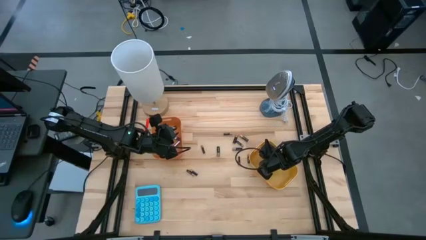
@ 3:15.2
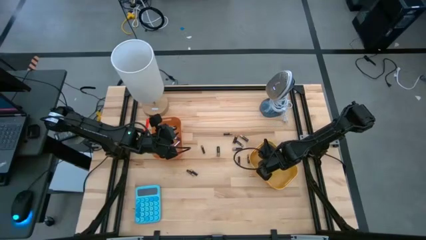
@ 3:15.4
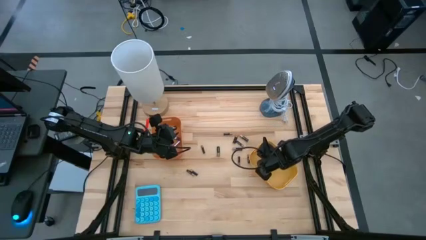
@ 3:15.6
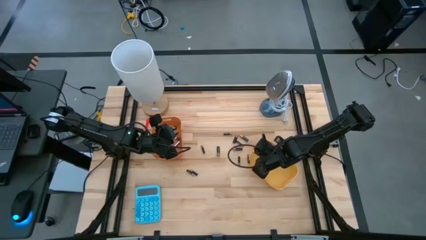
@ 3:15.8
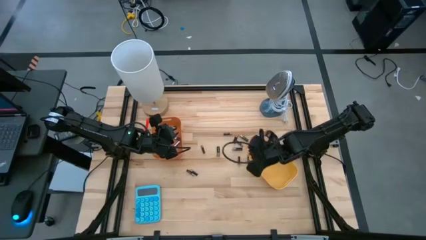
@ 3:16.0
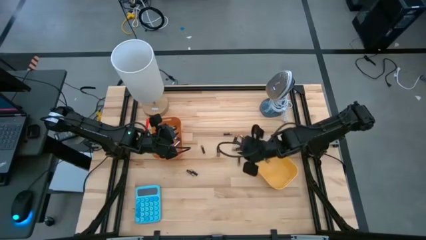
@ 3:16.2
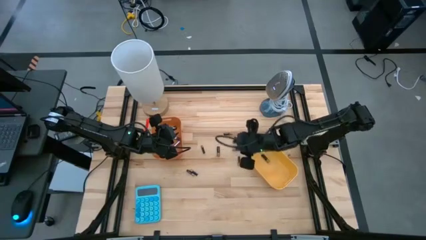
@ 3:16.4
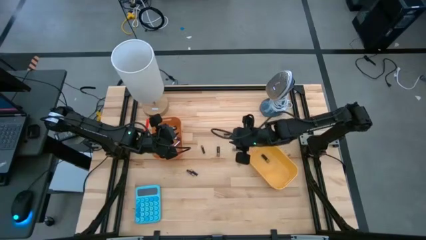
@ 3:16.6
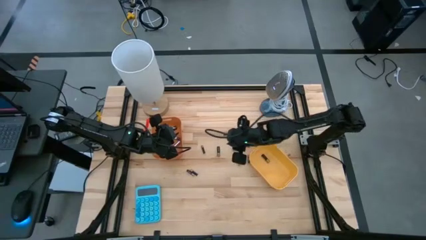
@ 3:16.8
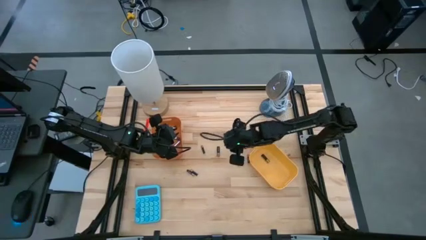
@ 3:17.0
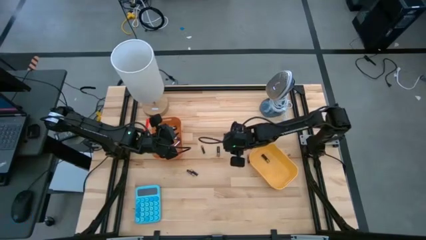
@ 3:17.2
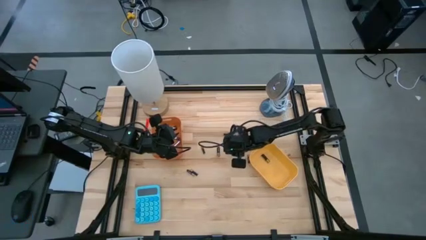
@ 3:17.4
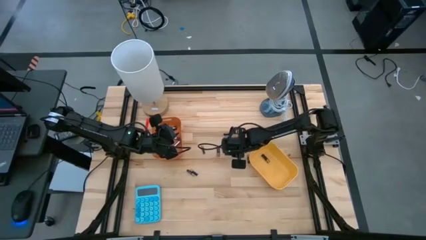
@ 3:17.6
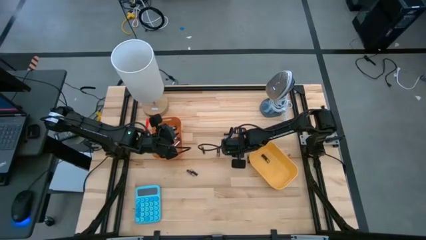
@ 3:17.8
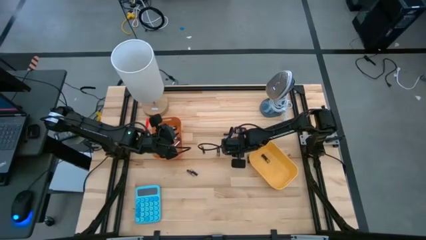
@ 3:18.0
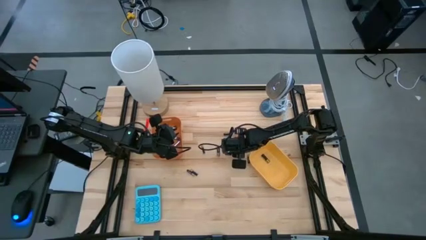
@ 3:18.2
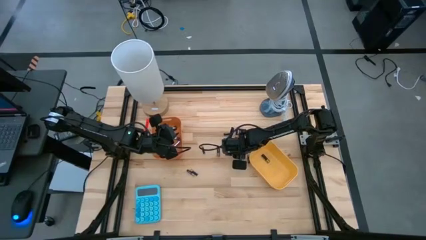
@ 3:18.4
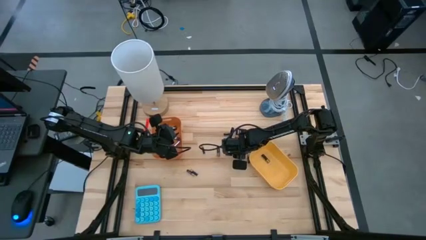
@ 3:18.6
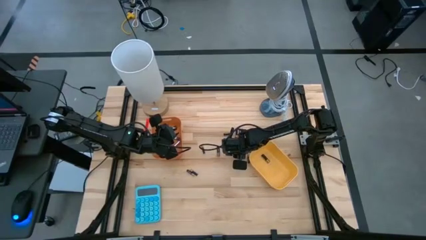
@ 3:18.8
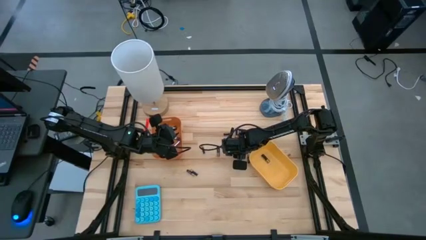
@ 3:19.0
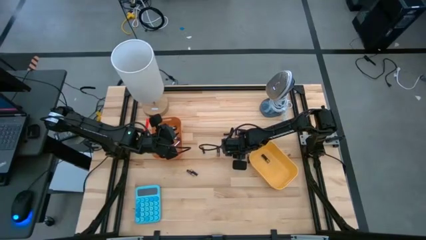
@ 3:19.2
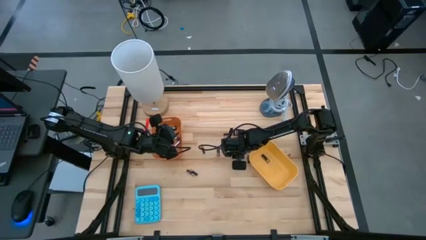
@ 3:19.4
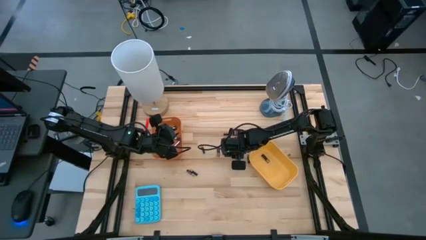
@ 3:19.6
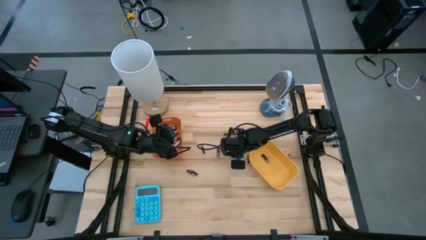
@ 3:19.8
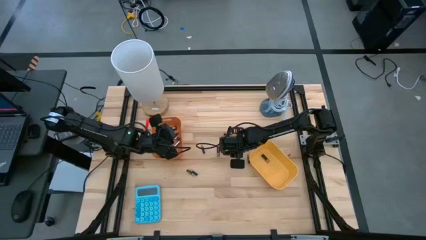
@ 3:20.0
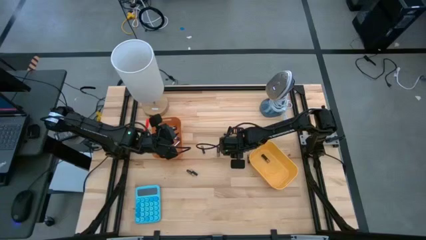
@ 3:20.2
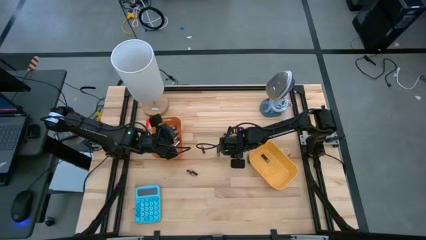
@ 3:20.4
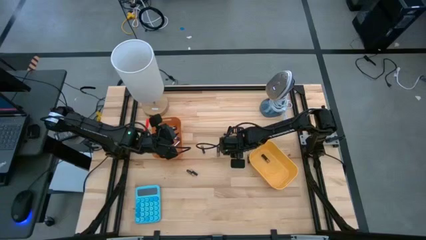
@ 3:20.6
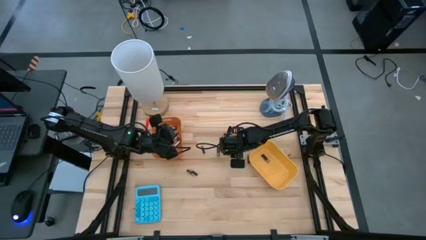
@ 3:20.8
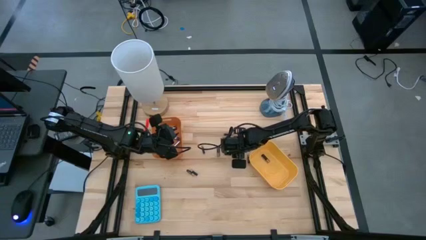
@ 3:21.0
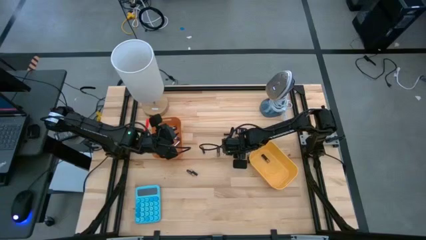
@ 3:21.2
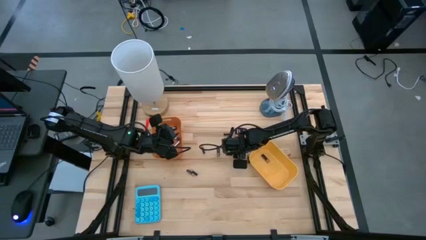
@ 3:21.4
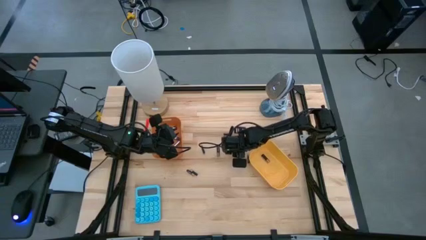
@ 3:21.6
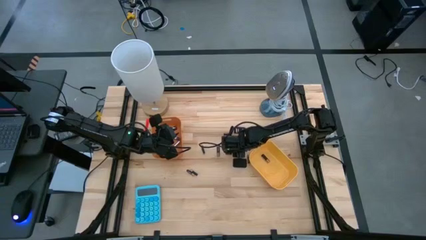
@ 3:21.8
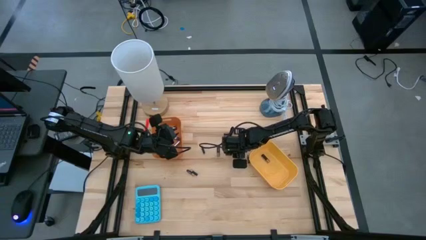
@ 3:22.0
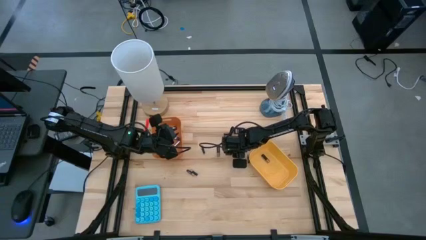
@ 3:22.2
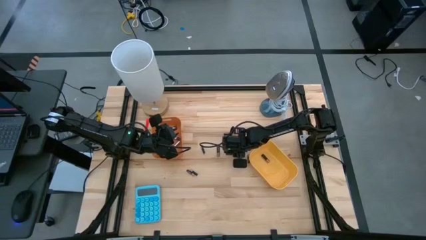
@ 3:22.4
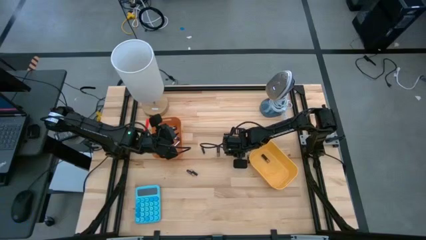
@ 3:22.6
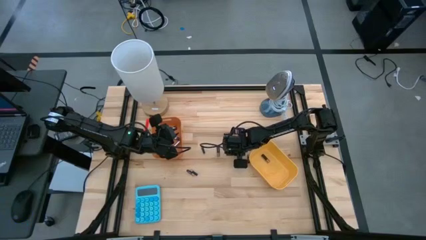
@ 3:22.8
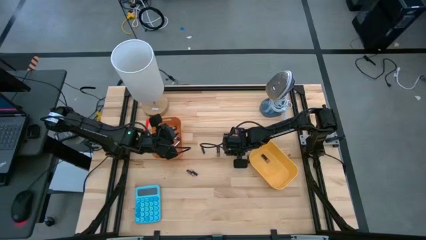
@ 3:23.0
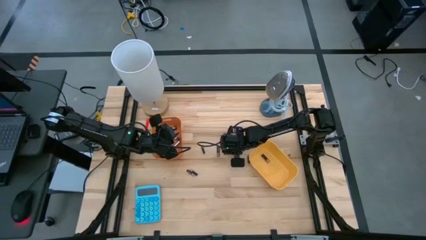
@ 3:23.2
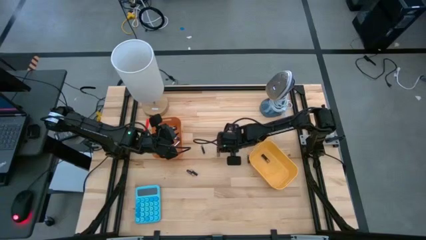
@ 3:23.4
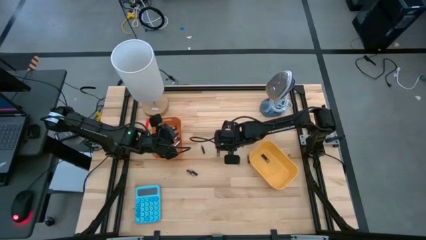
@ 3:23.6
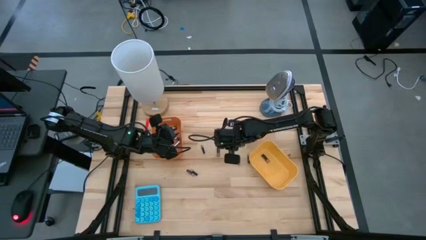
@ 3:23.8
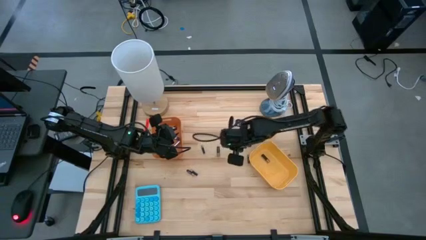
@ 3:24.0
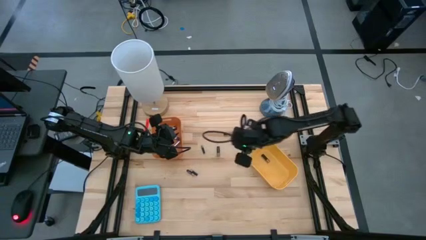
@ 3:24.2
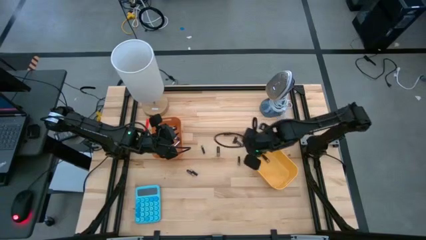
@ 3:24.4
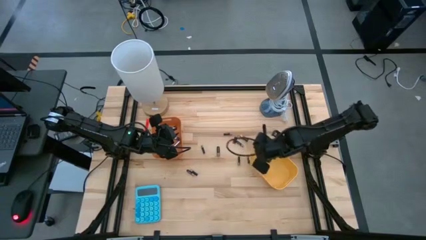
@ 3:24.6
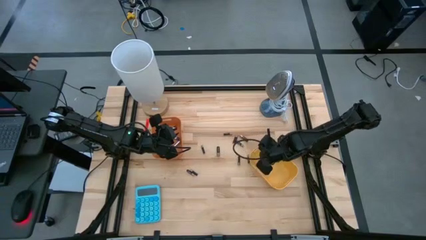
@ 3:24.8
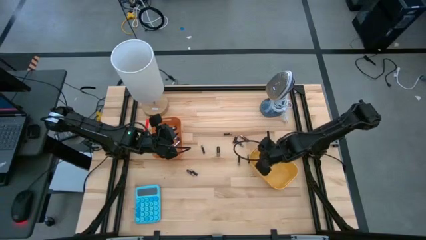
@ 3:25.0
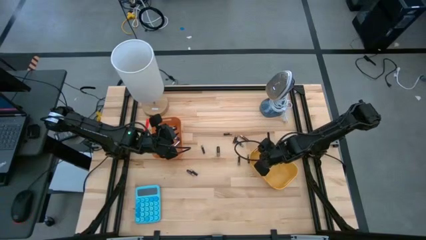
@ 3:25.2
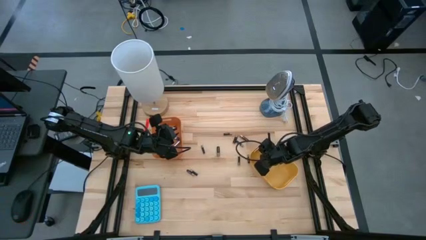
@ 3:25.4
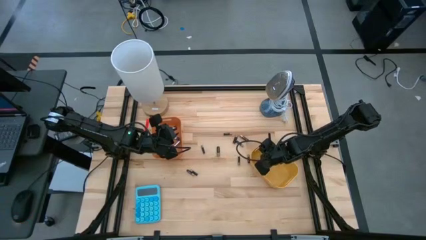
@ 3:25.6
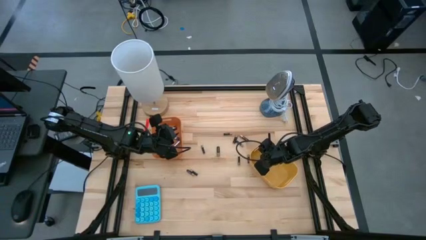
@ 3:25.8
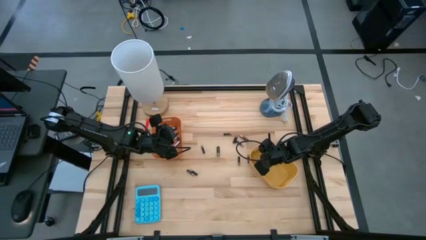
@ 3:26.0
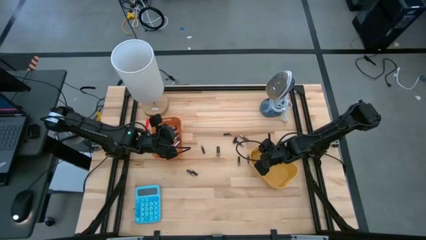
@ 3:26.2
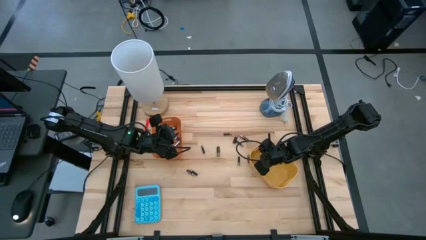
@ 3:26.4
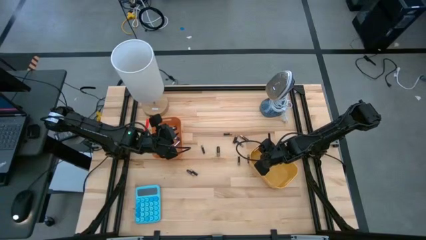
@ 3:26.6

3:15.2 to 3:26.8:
Task: Sort batteries
Put the gold battery into the yellow bin

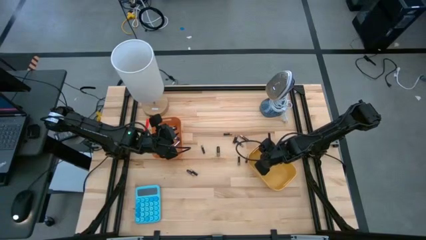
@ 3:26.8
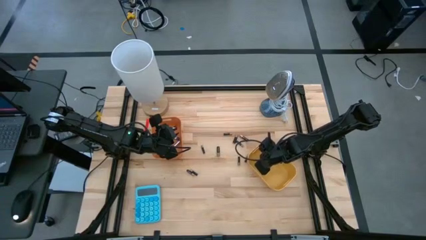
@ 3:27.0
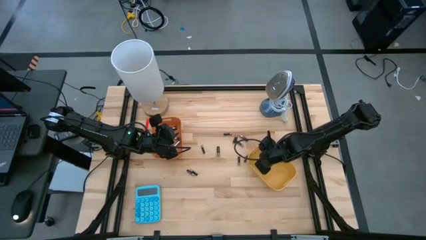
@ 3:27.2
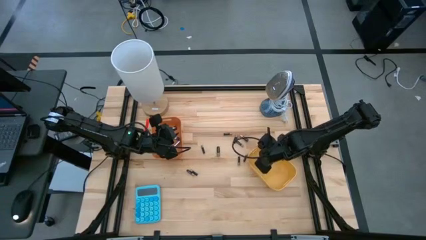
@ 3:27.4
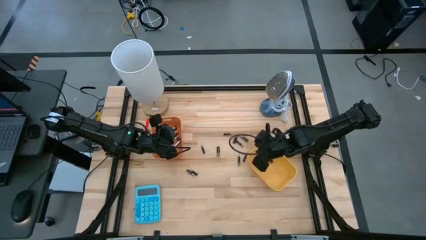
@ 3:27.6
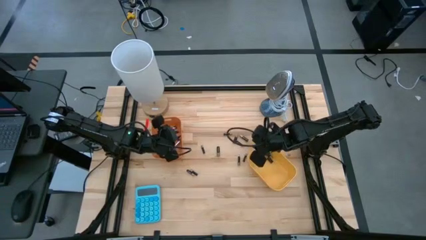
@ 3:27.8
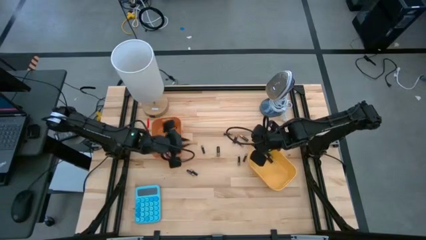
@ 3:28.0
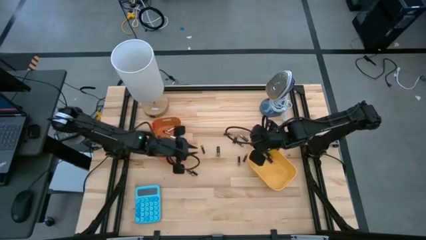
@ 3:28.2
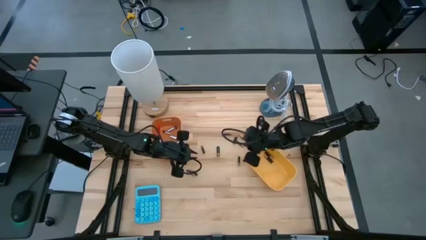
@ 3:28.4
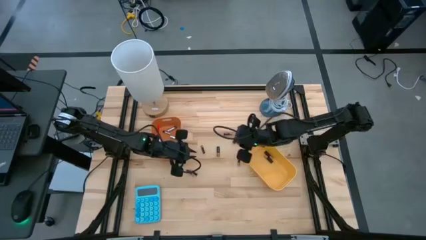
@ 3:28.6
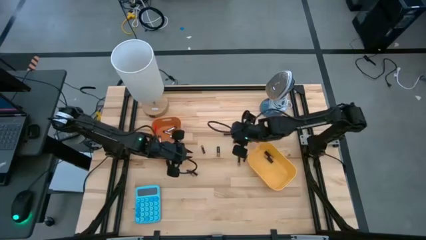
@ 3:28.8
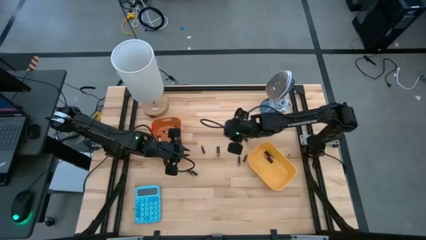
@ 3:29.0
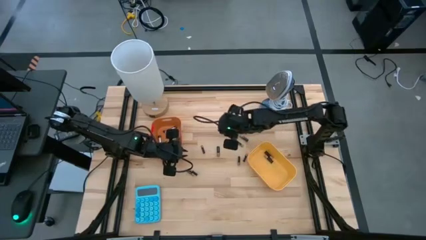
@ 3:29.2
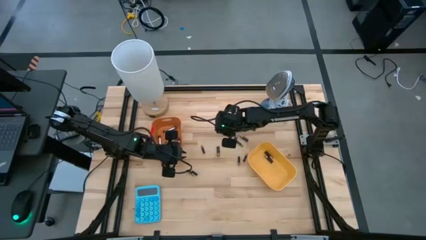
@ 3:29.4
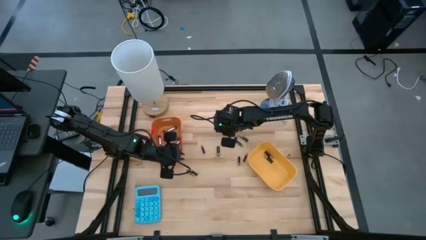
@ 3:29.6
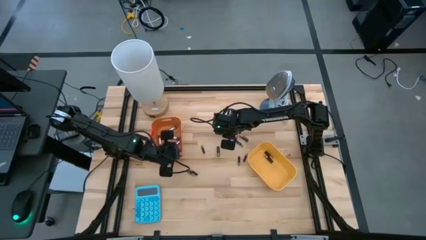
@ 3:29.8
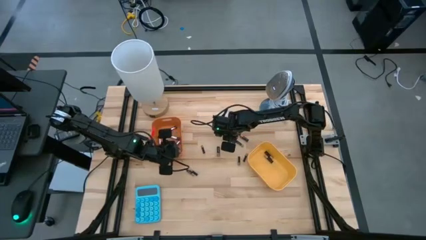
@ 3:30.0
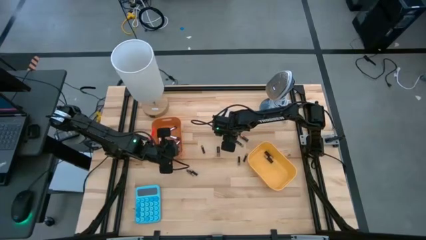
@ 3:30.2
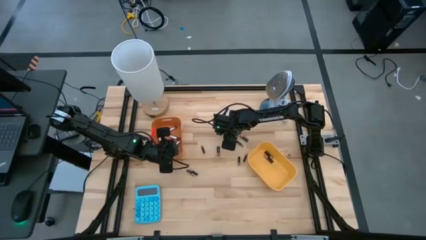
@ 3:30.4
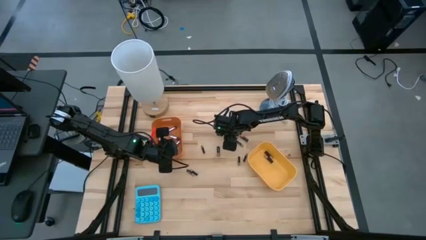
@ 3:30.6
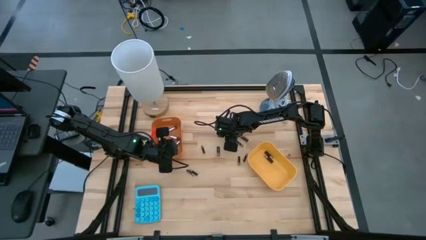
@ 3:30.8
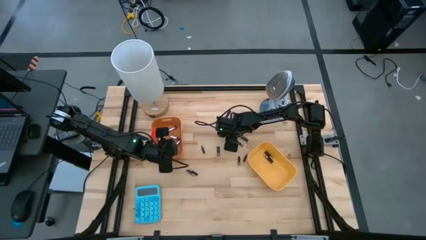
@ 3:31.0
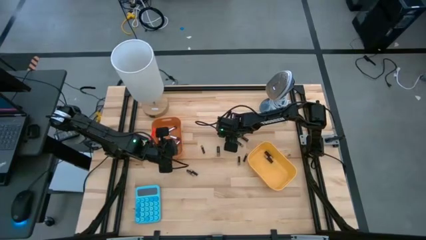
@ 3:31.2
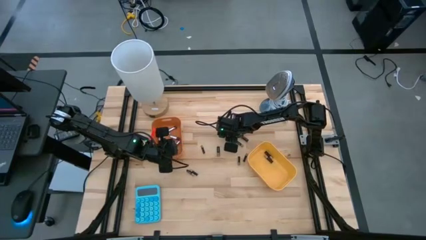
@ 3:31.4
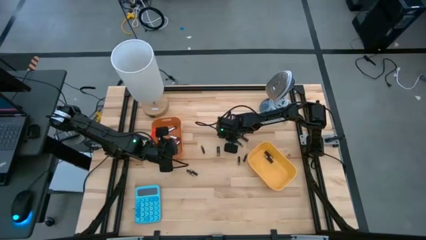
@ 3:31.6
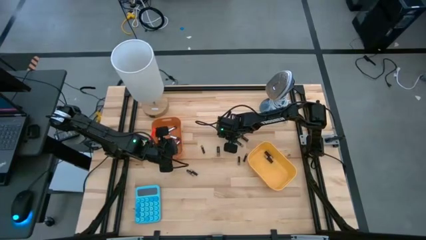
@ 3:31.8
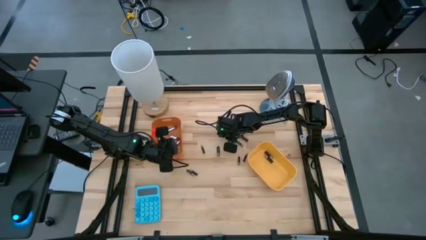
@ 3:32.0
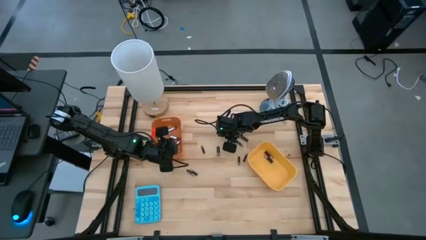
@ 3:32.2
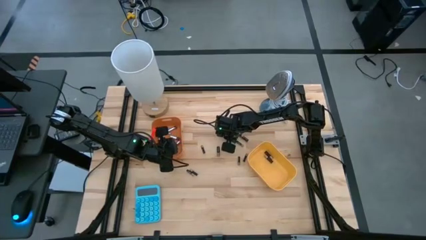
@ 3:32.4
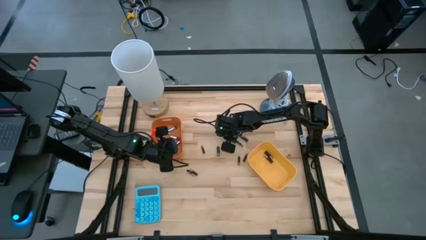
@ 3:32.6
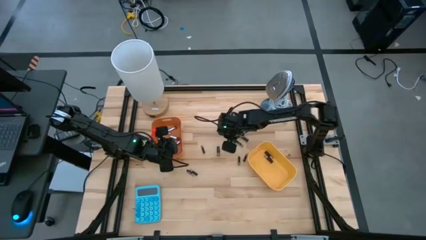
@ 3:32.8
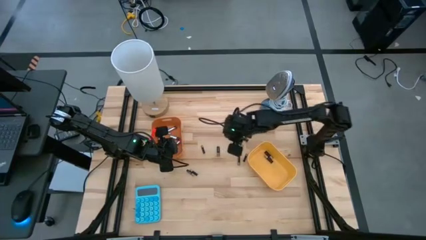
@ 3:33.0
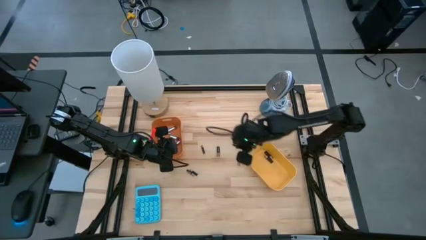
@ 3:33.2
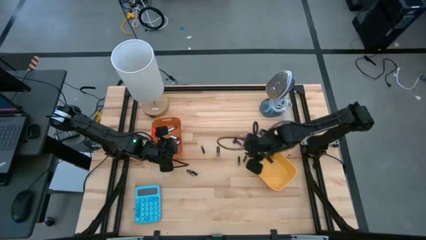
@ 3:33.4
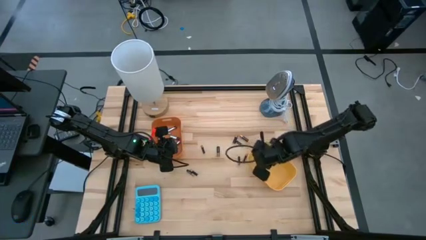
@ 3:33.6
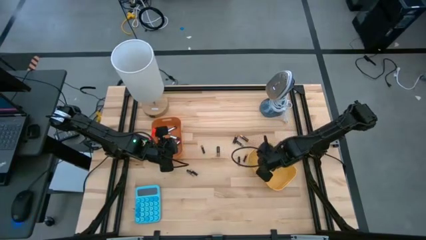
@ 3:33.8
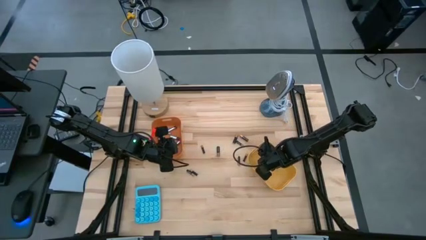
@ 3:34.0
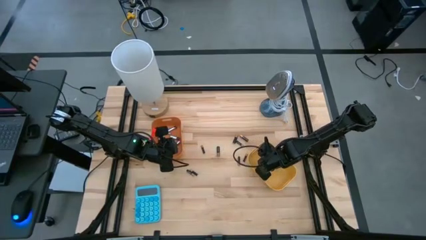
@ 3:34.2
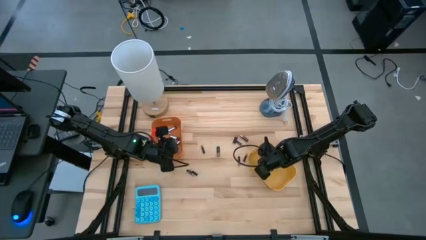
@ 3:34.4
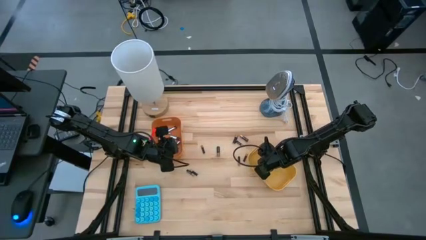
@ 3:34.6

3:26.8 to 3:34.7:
Put the gold battery into the yellow bin
